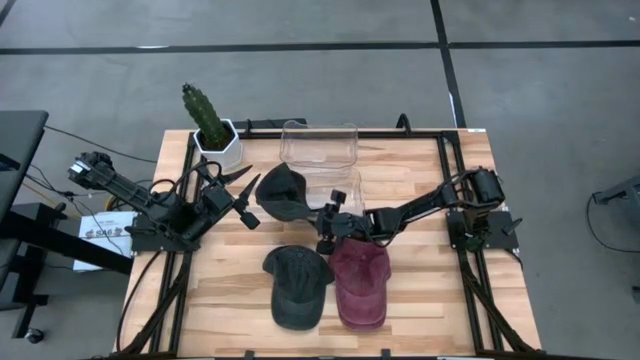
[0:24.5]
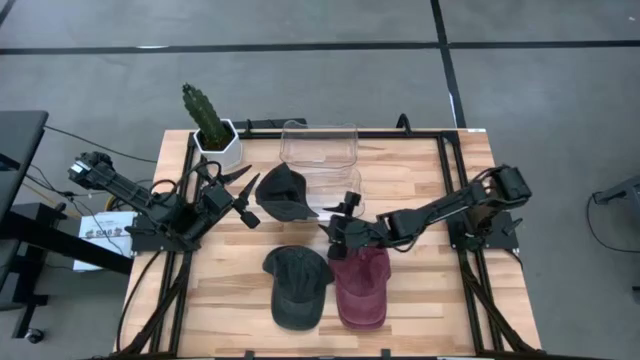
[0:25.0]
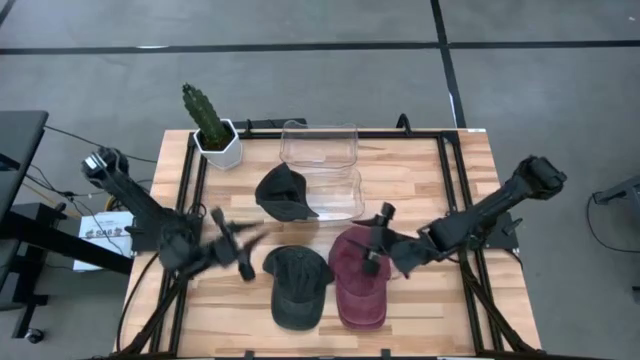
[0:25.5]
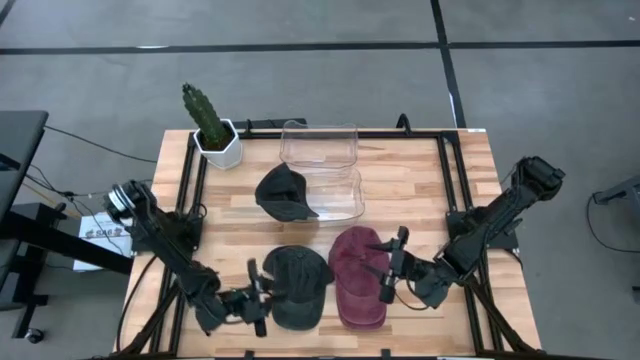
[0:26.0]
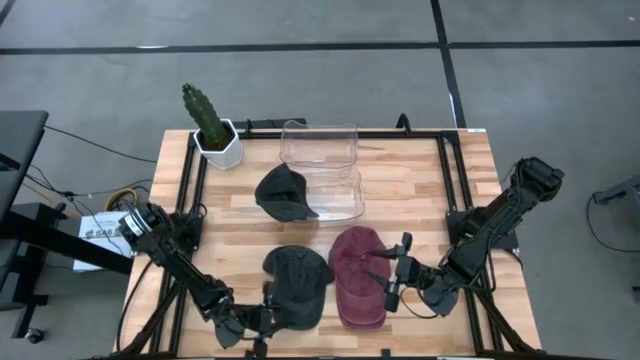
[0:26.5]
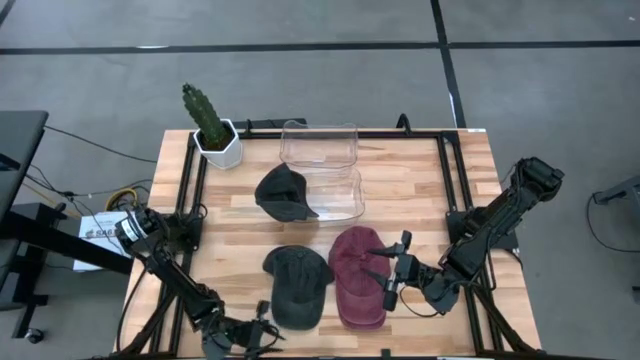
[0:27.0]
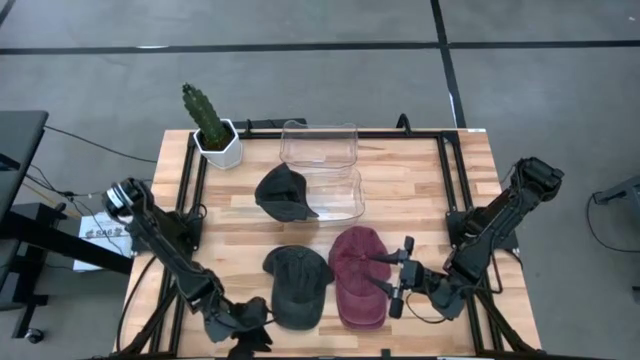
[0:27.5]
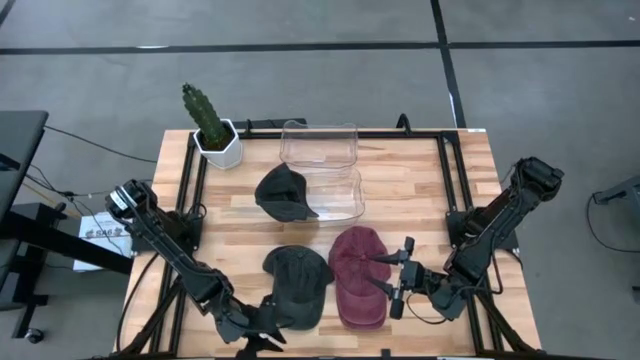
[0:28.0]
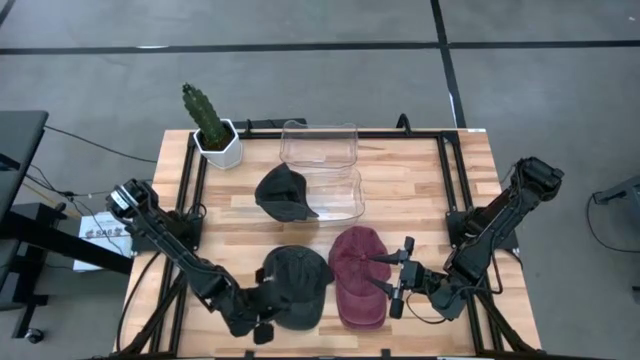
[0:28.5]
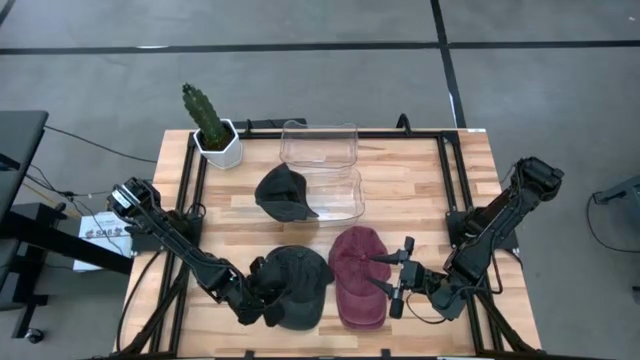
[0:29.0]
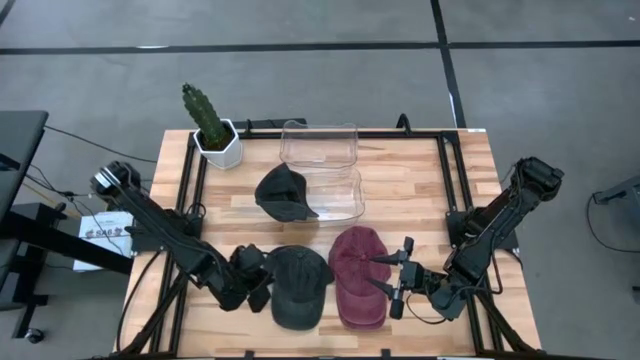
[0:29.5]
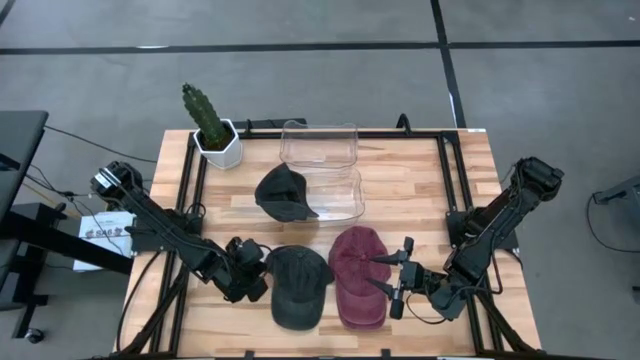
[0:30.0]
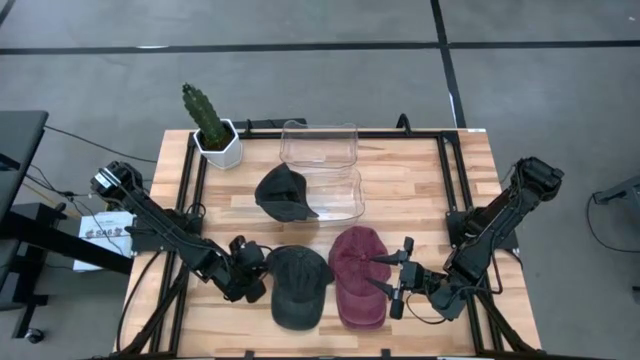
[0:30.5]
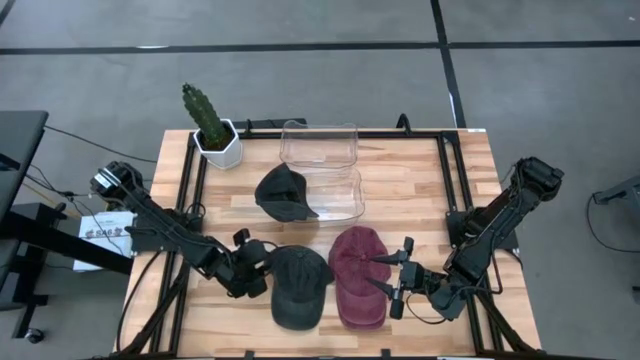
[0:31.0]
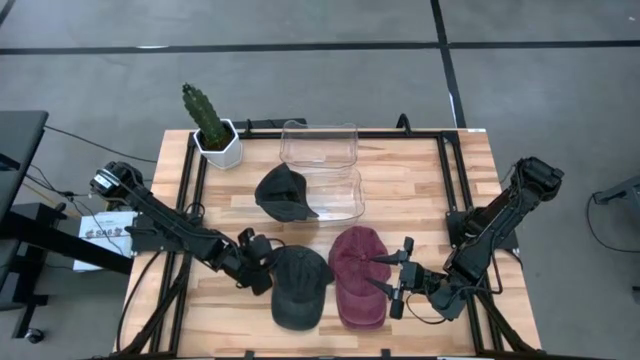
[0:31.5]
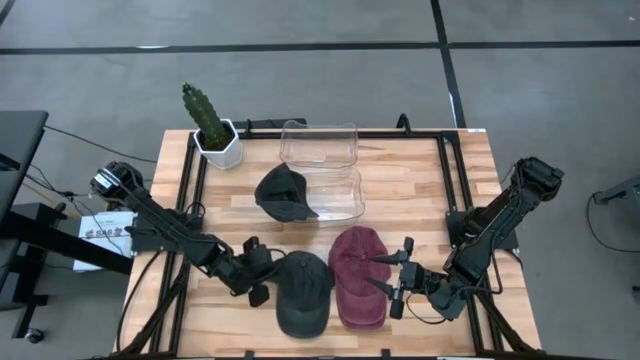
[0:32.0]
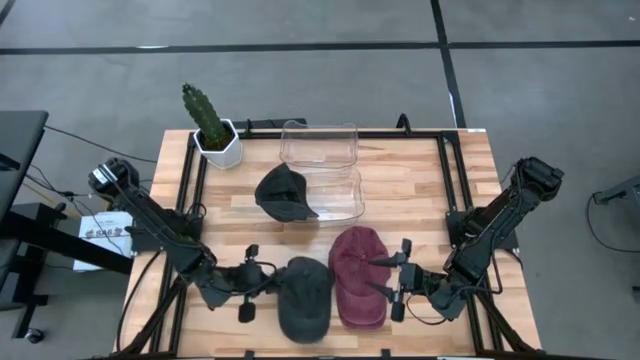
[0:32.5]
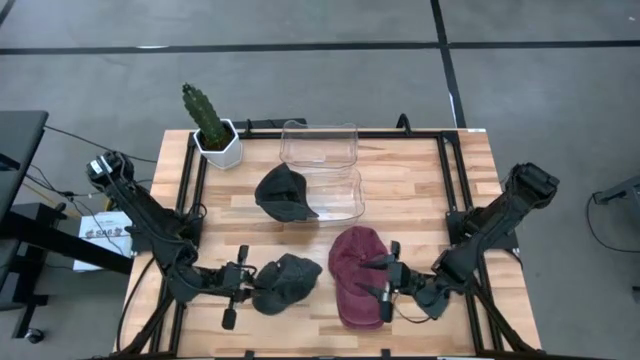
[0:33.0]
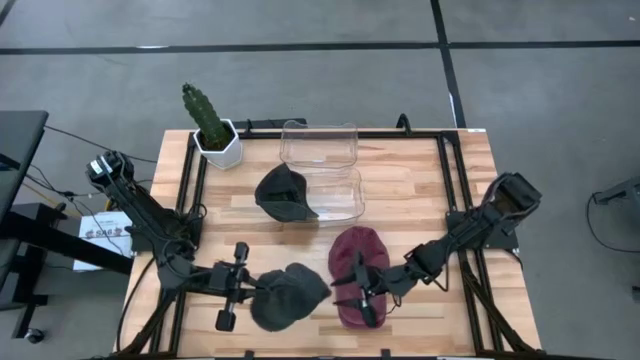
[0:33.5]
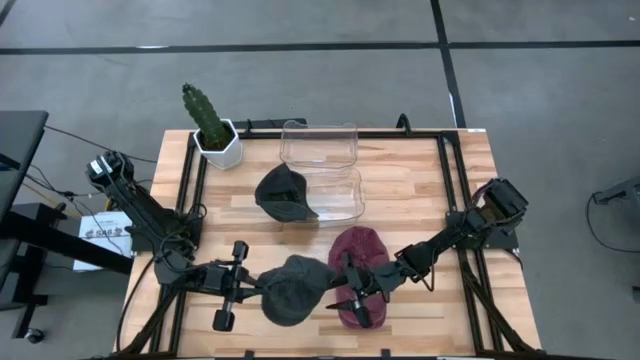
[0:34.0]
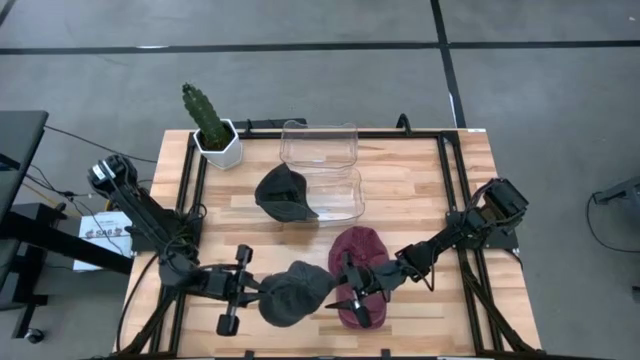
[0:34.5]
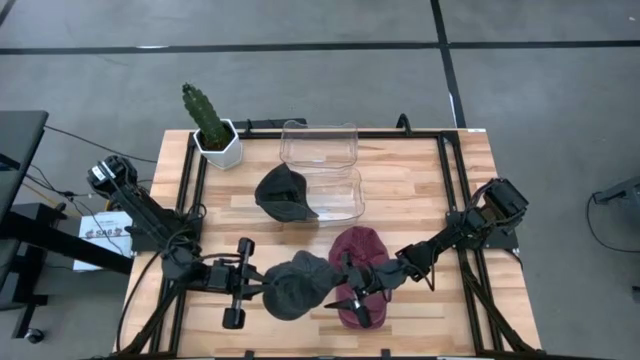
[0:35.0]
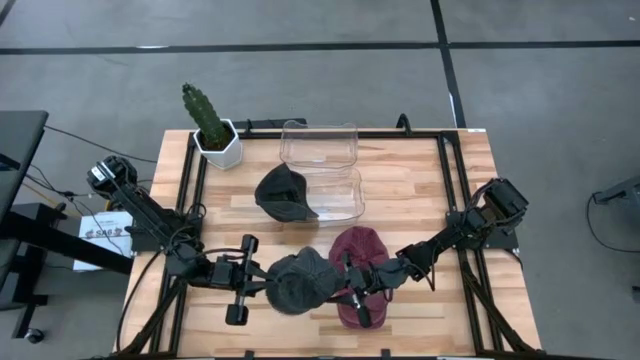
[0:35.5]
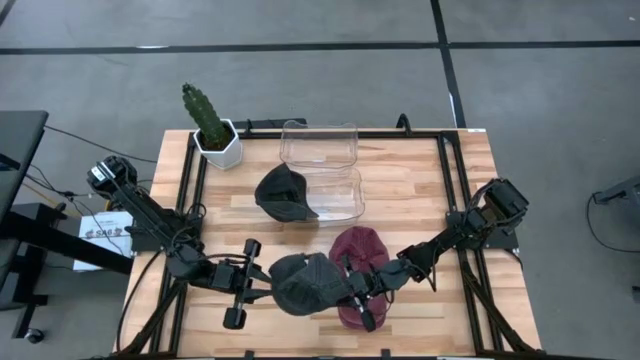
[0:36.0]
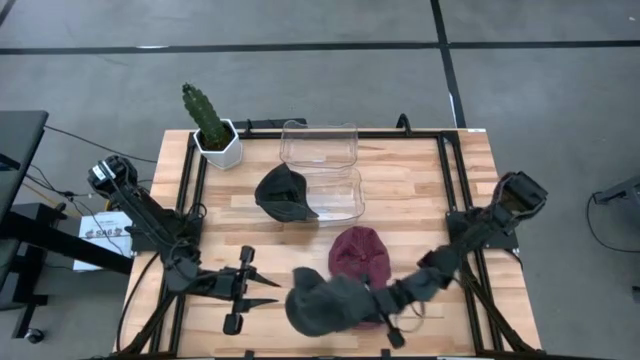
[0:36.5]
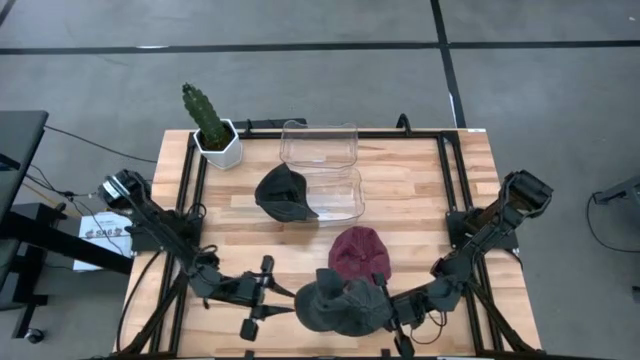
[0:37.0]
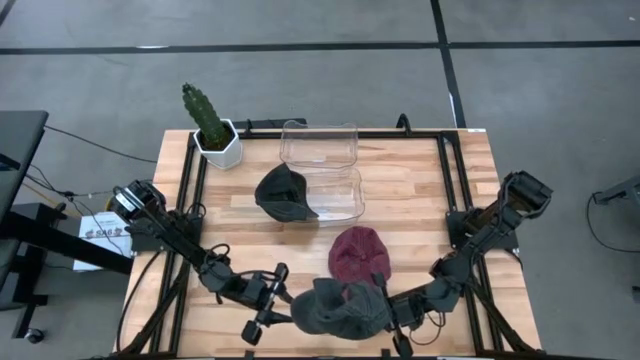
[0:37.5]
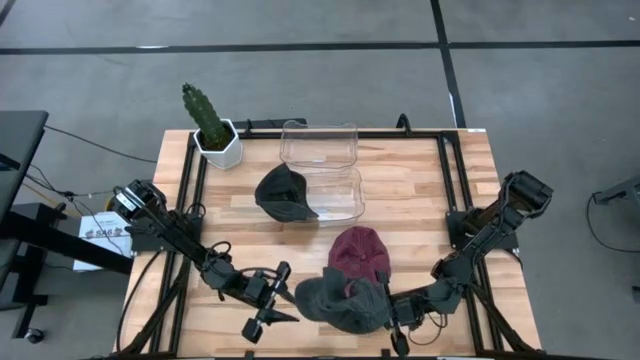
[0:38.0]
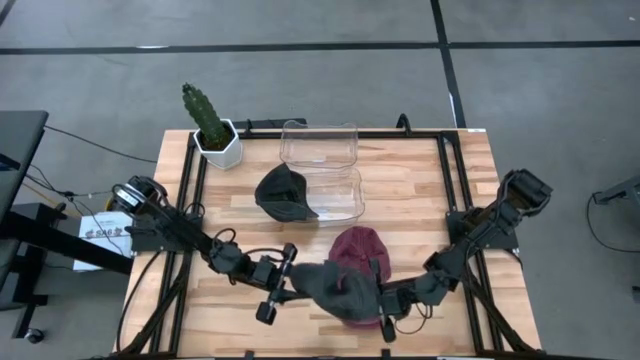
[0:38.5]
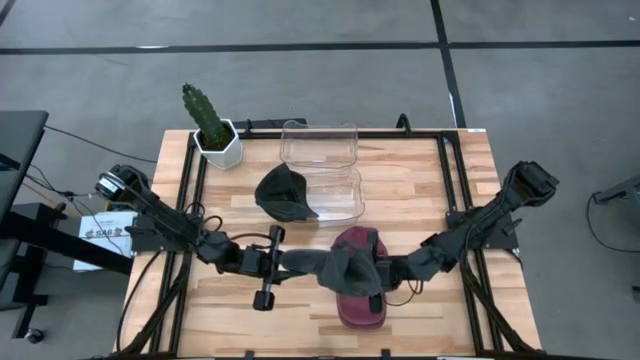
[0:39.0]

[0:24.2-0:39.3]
Task: Pick & Place hat
Put the black cap into the bottom transparent bin
